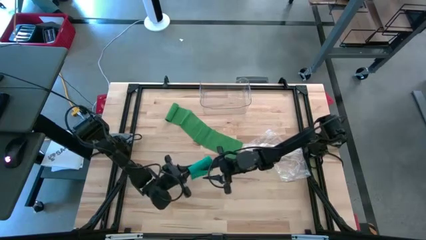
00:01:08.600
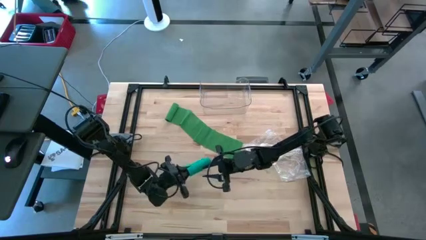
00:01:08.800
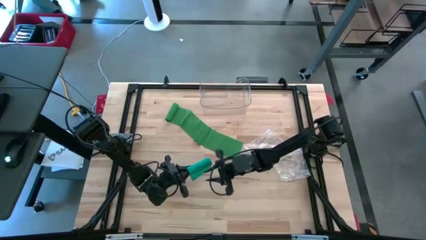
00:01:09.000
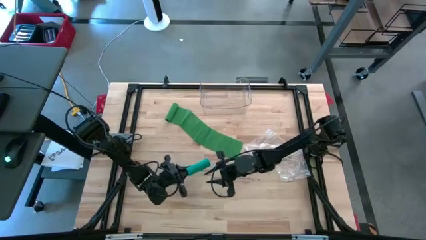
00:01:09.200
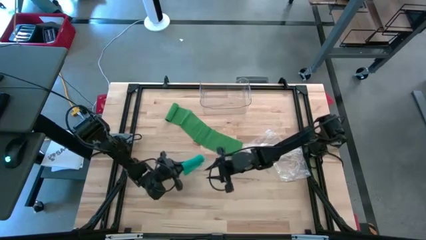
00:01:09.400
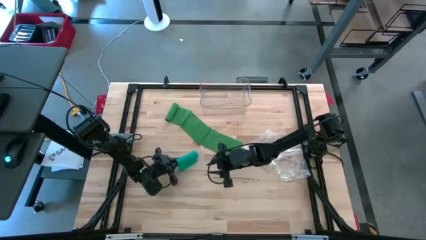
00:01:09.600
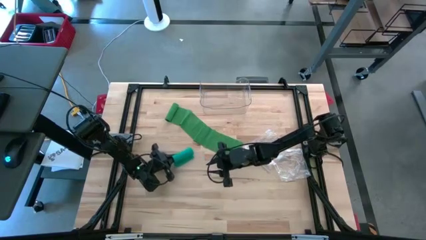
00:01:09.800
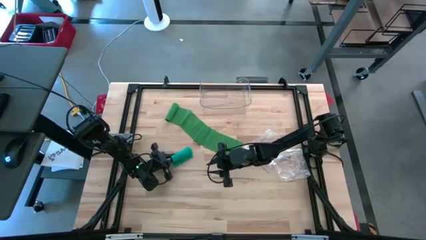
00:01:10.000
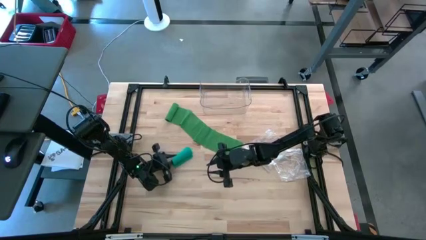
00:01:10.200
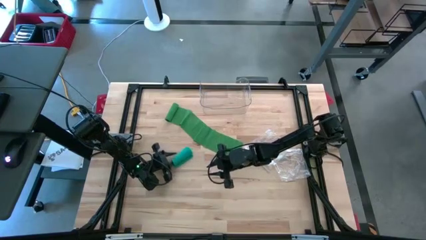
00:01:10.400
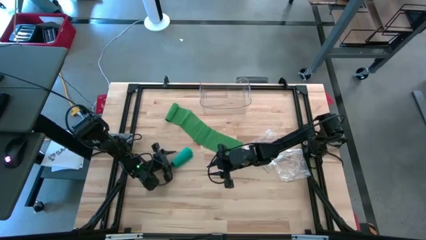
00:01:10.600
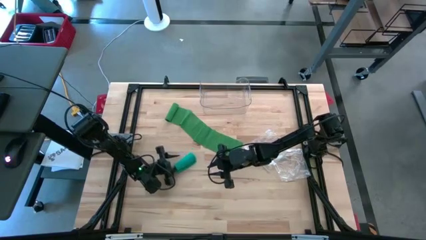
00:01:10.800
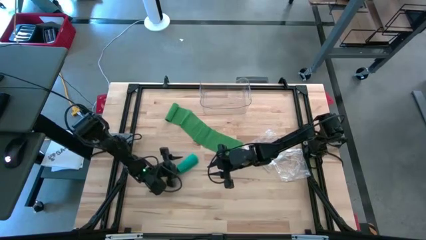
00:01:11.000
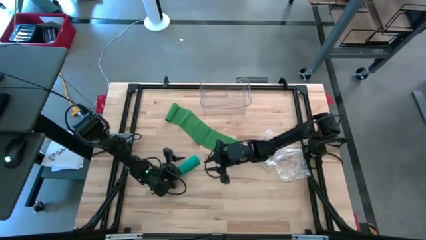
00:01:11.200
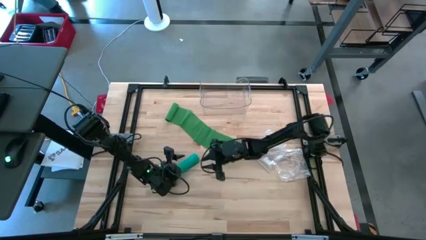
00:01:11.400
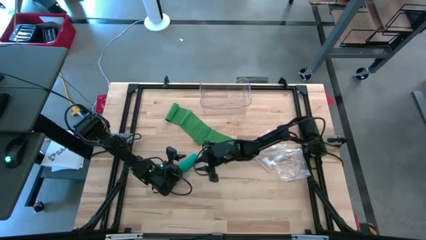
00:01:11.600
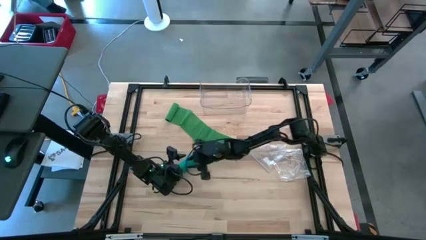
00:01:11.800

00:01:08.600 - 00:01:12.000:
Task: Roll bandage
Roll the blue bandage

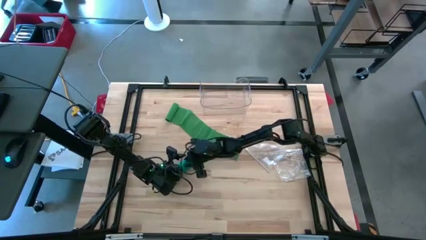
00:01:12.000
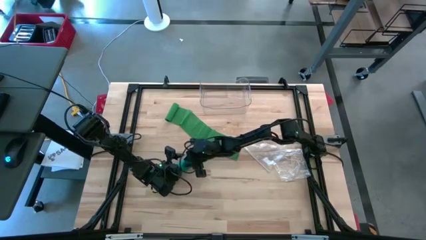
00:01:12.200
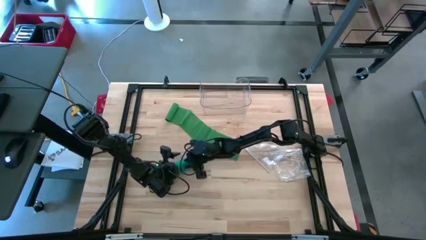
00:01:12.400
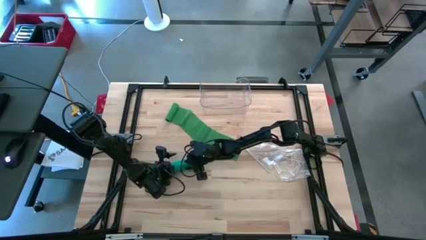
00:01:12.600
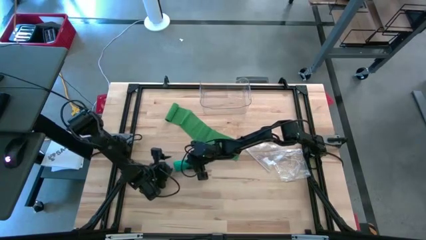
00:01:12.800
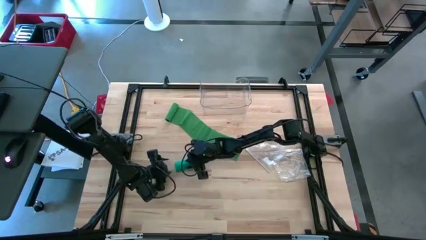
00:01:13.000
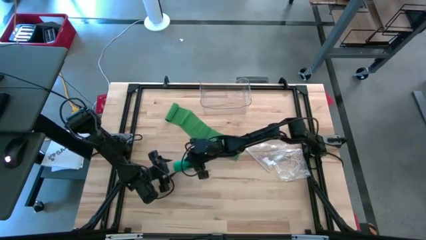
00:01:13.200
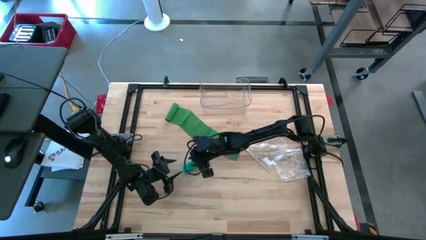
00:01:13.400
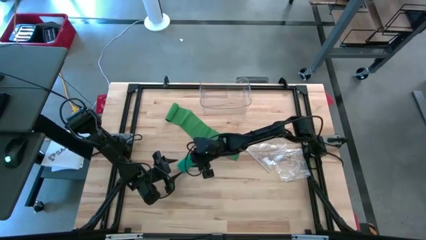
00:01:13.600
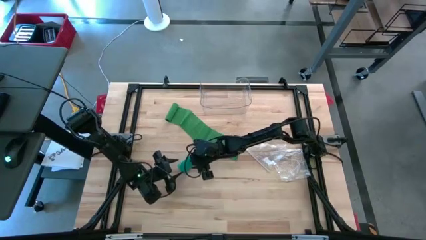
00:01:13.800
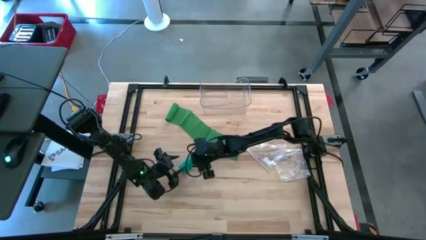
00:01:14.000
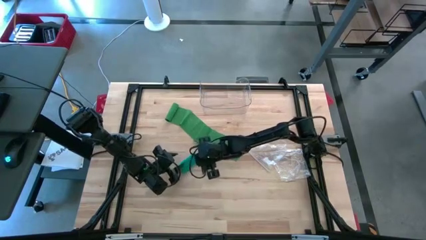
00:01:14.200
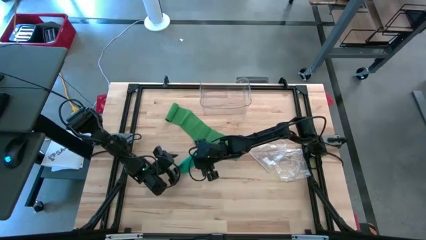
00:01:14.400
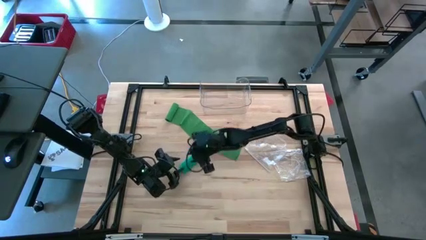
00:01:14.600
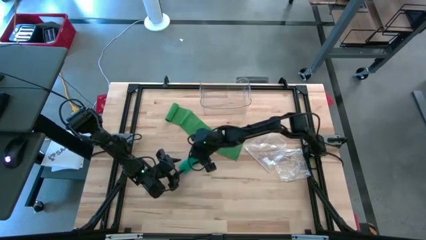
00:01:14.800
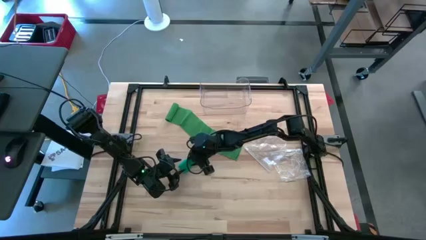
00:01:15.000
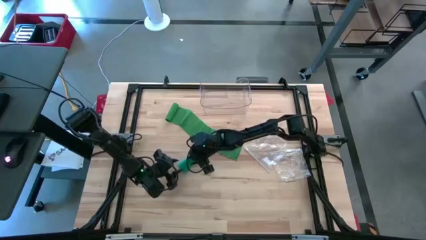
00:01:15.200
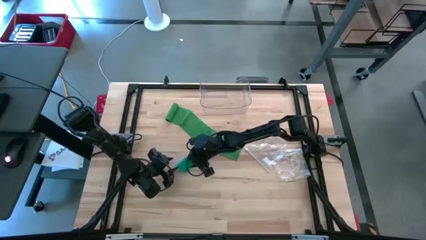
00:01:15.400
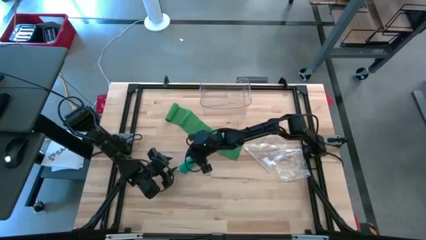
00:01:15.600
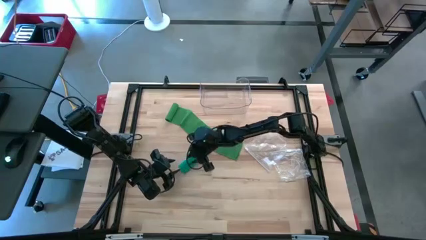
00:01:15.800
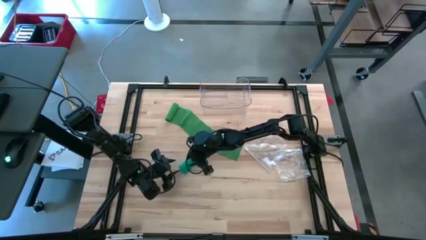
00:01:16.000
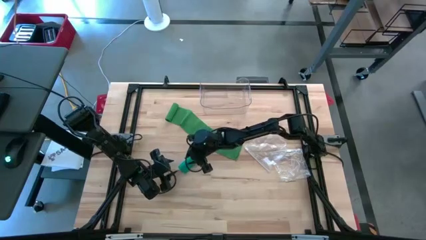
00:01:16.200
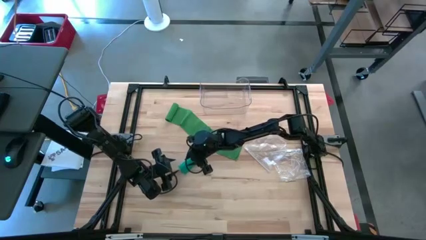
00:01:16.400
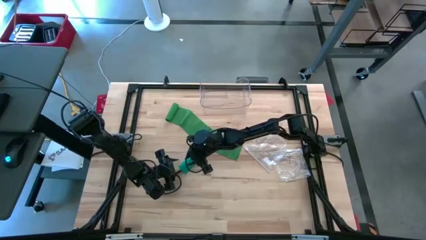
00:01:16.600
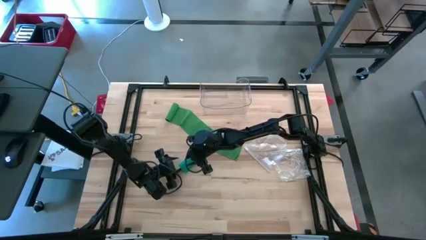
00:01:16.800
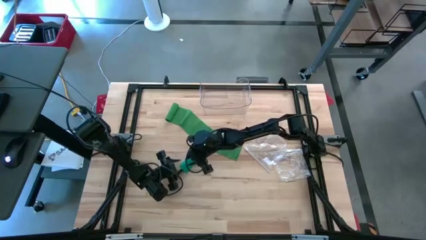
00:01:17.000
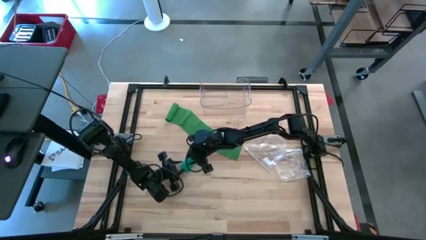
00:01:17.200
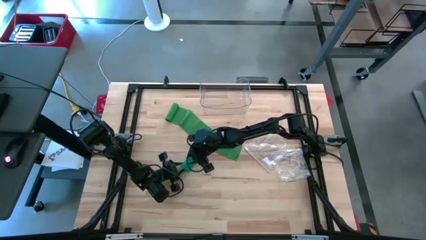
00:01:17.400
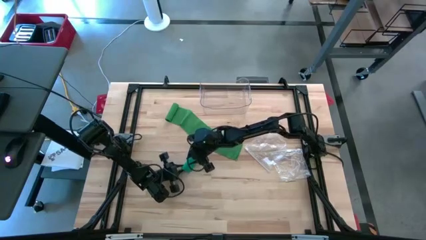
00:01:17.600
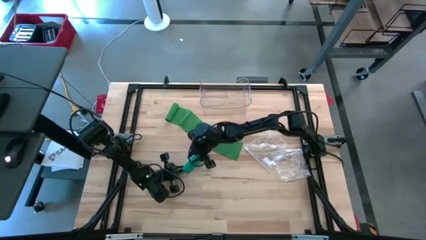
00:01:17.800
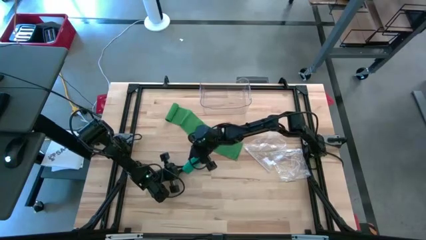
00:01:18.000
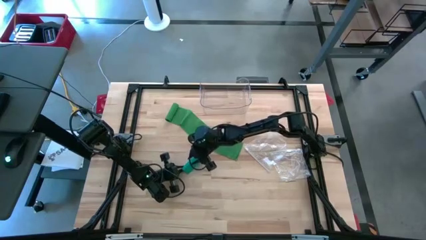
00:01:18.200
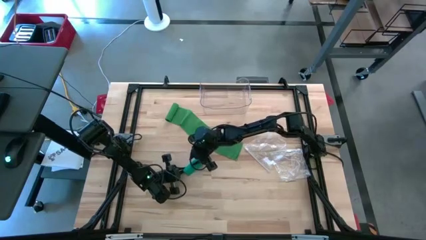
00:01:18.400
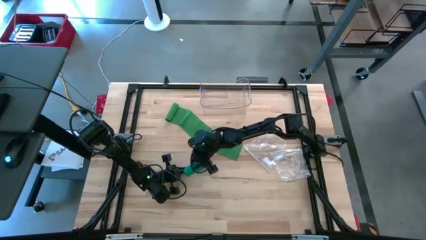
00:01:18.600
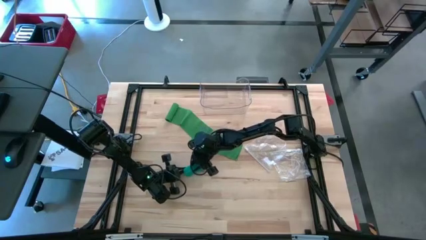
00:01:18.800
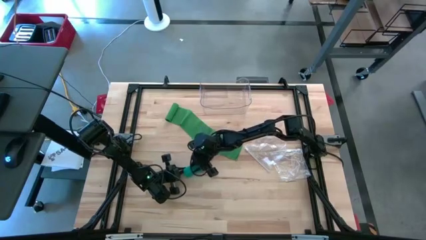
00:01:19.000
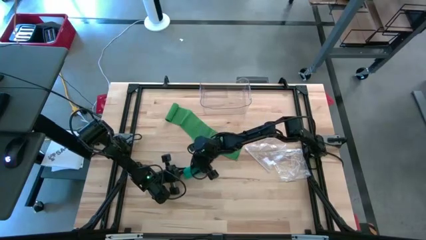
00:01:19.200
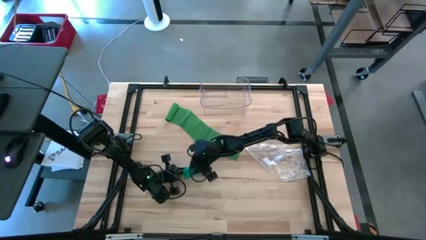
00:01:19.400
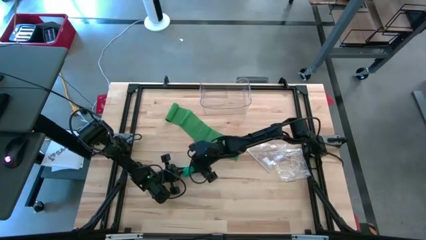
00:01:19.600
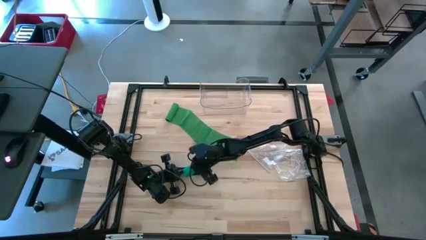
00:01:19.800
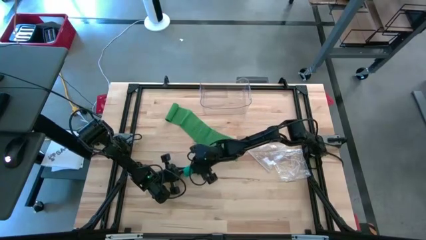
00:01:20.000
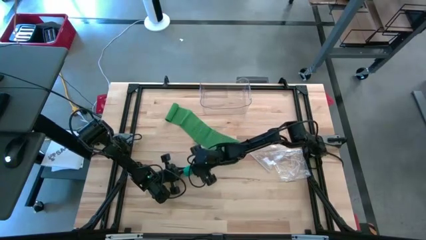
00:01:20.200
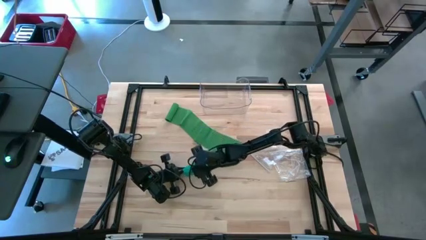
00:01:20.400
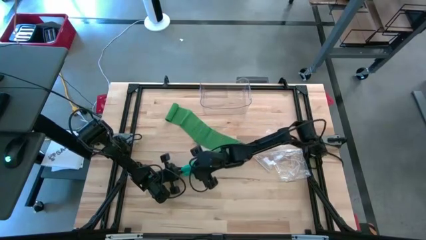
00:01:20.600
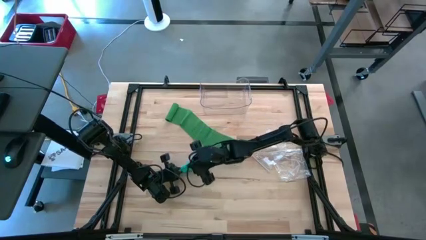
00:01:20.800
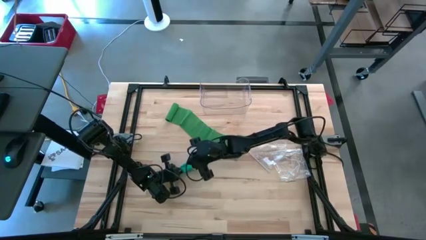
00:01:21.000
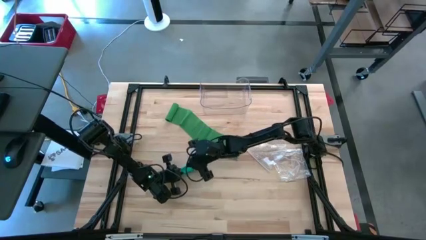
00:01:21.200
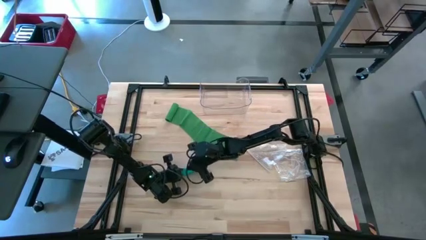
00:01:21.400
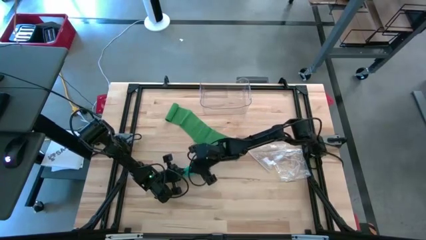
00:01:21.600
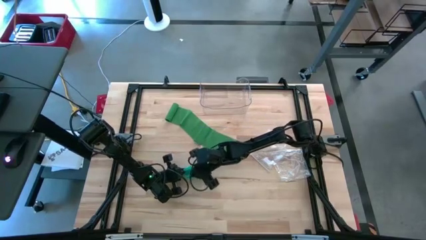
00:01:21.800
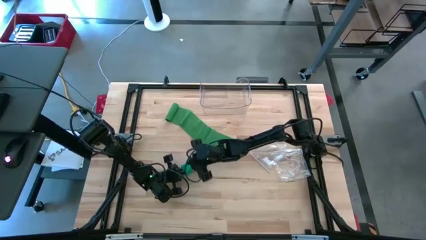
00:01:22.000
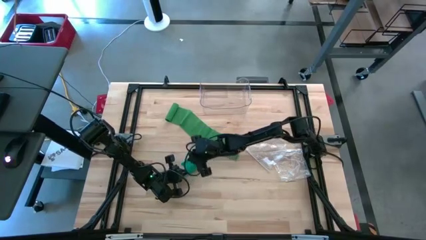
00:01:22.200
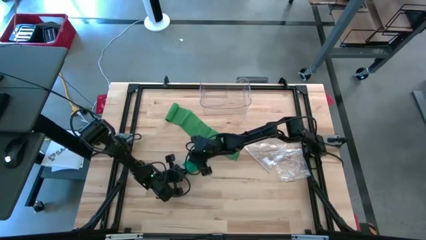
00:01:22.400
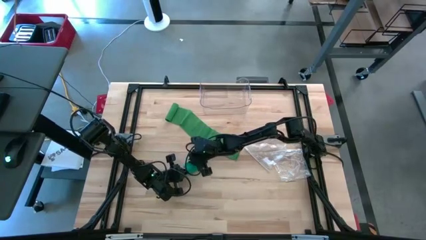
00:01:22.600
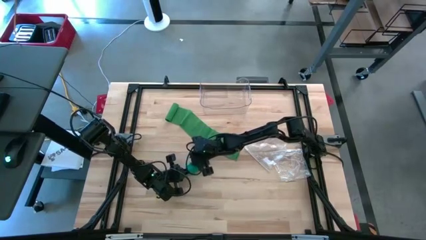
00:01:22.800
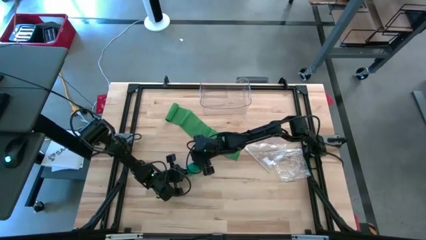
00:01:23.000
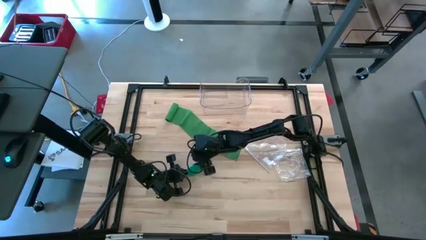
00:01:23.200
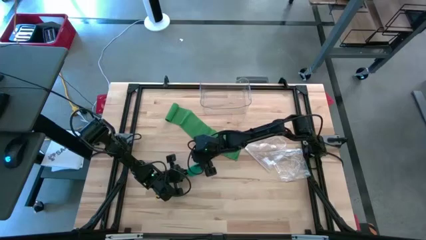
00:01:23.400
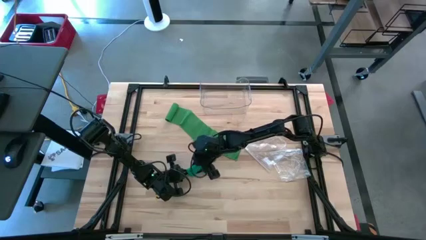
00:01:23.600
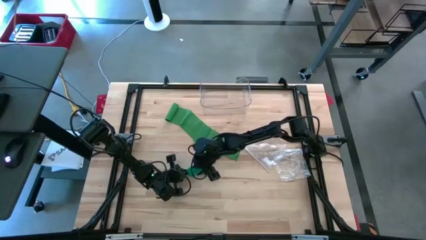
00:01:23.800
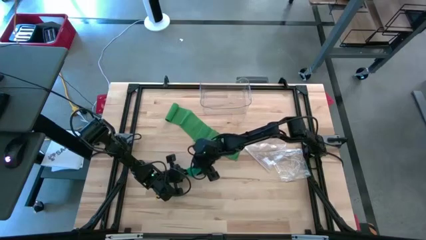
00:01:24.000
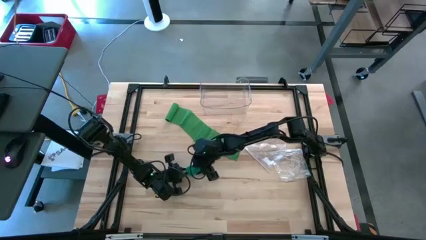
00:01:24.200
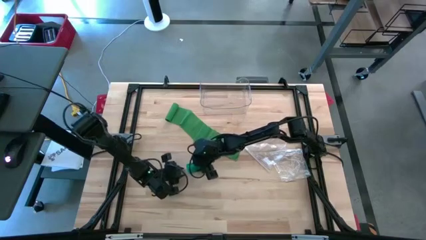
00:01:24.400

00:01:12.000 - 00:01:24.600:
Roll the blue bandage
